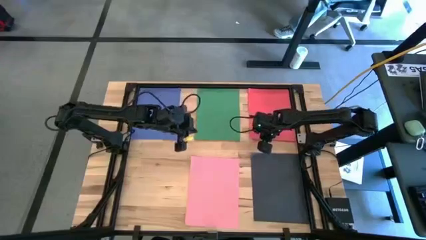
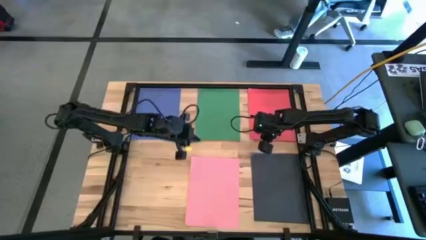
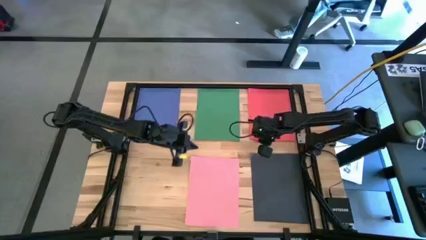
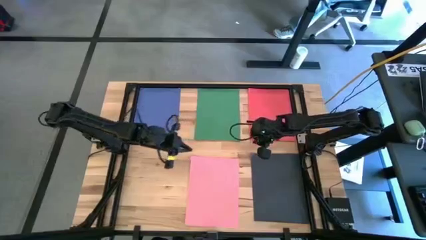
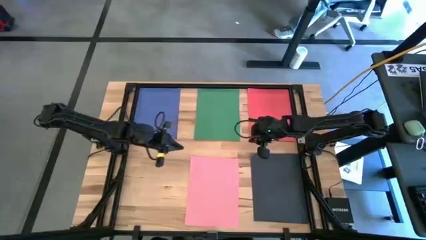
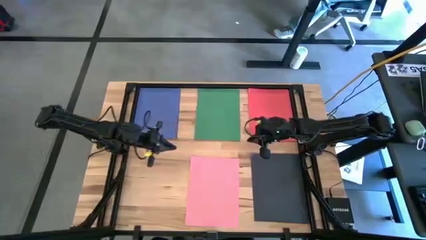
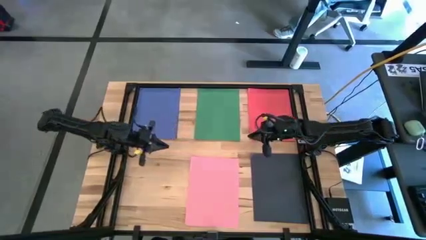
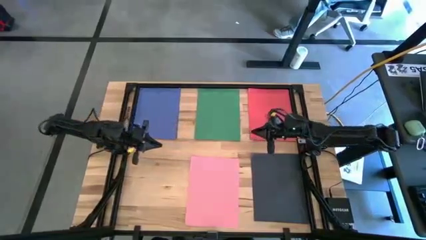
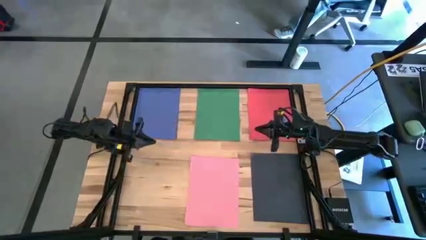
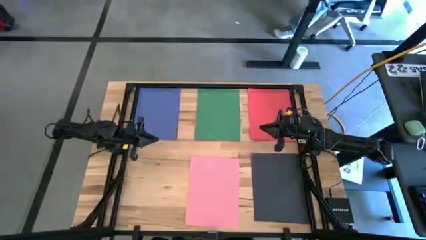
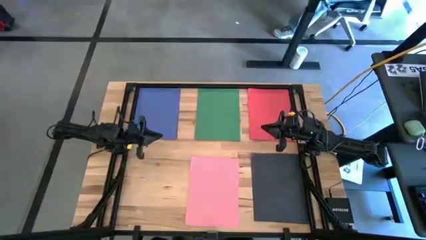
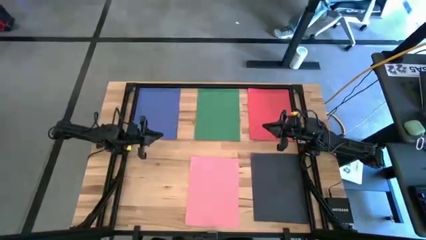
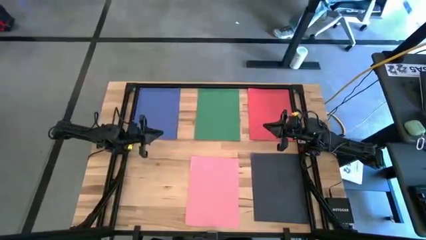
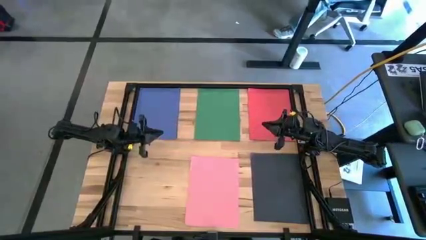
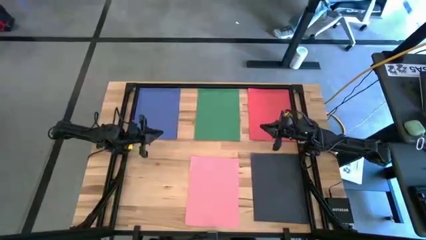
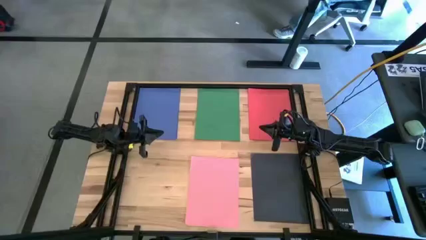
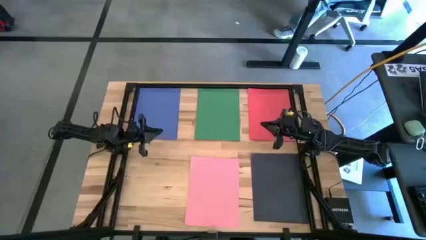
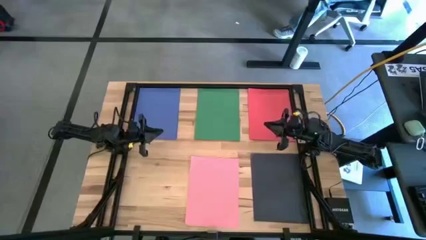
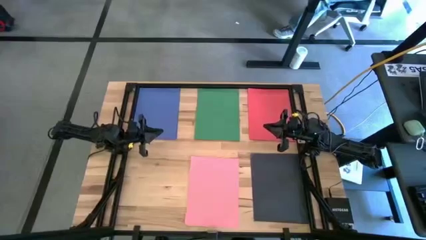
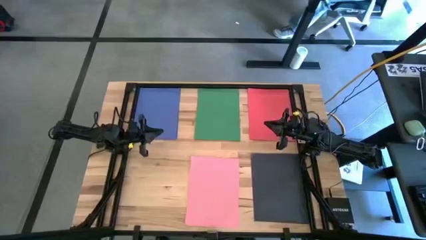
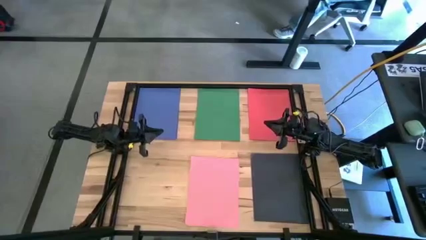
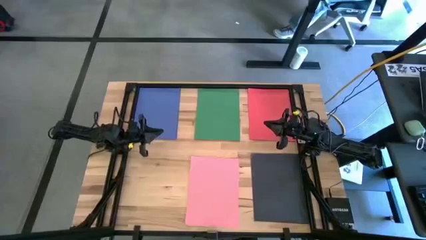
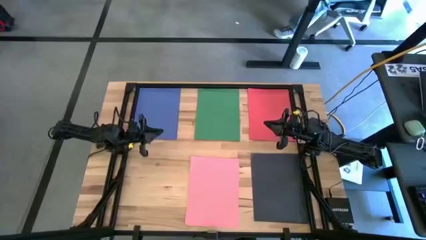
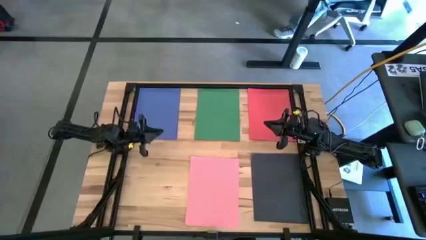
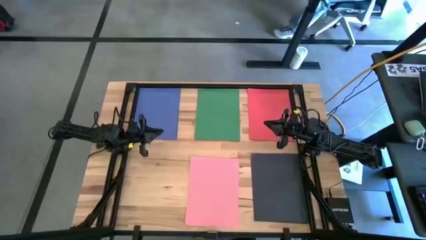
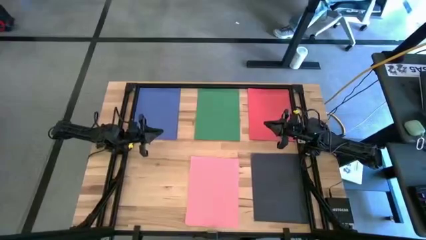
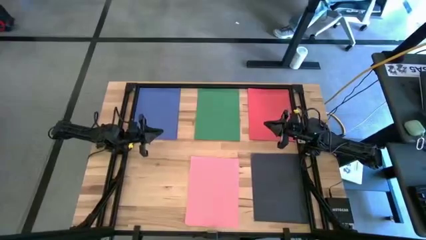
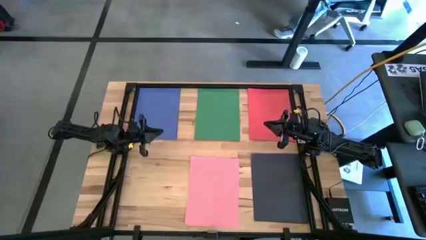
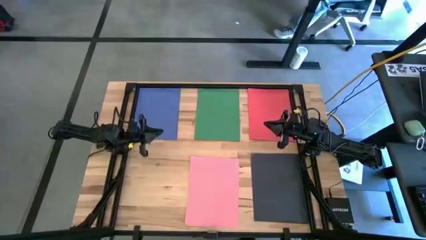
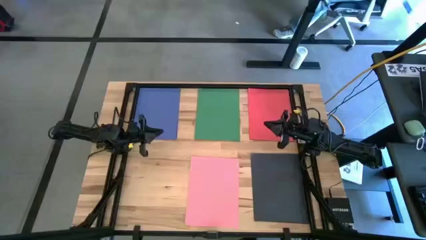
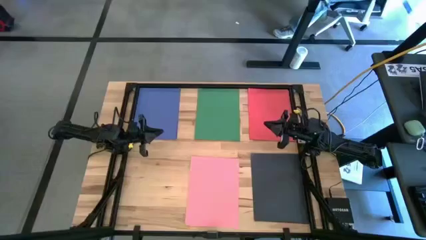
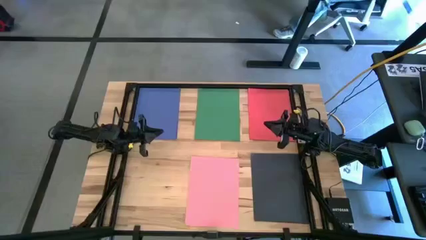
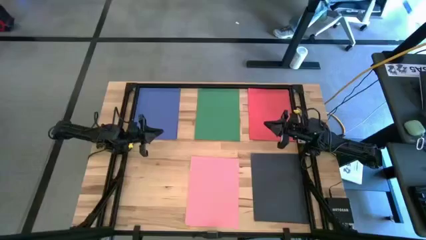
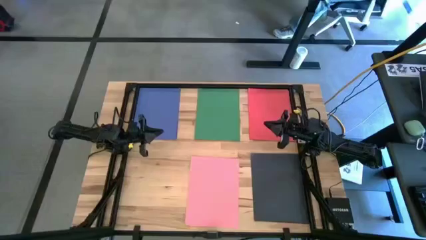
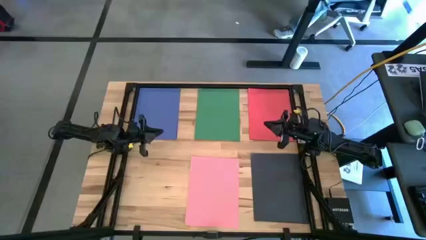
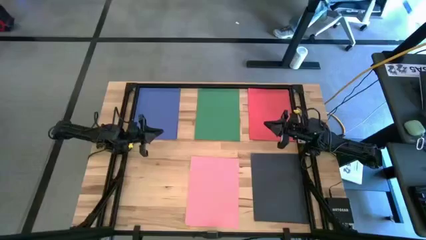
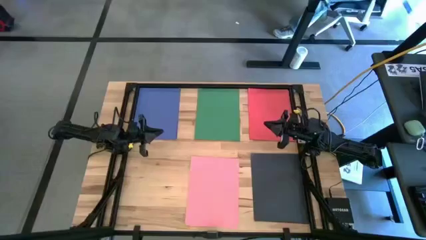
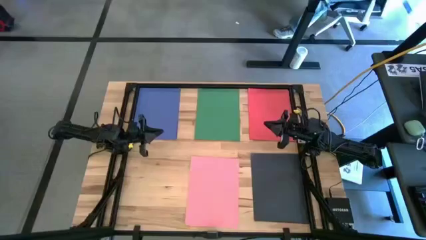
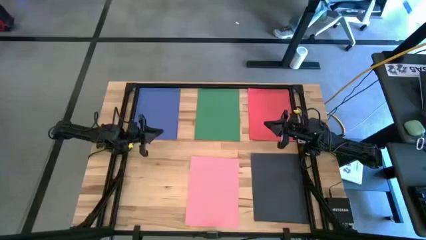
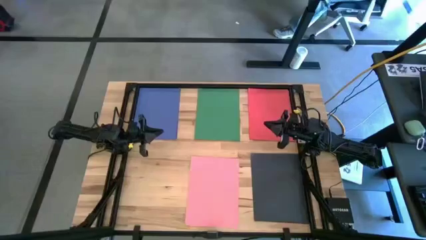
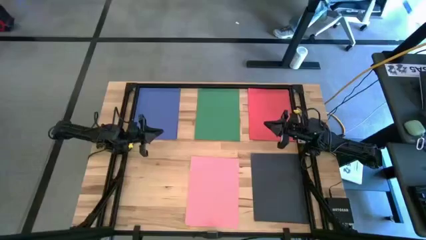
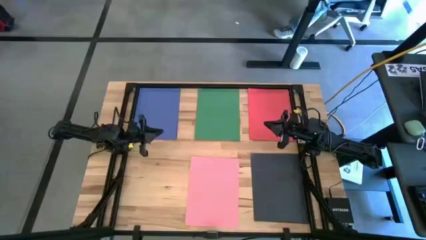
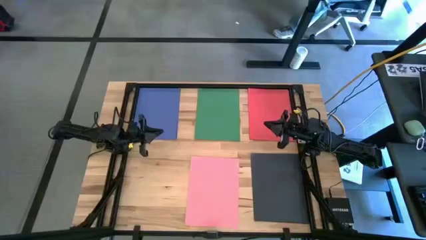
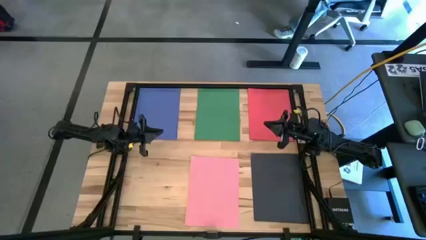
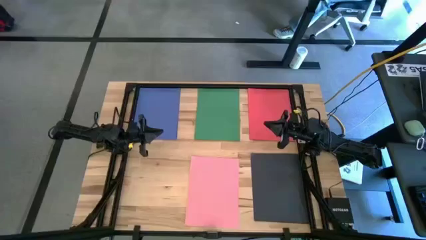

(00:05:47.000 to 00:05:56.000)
Task: Organize paper
Return to Home Position

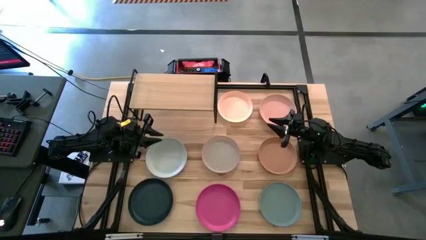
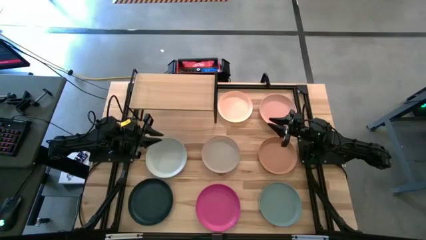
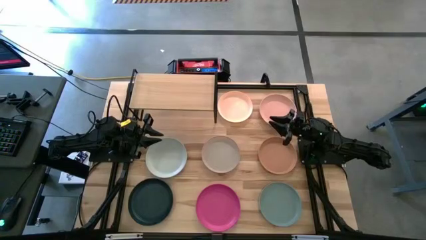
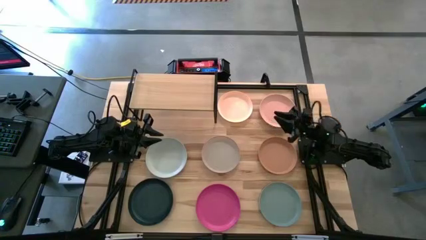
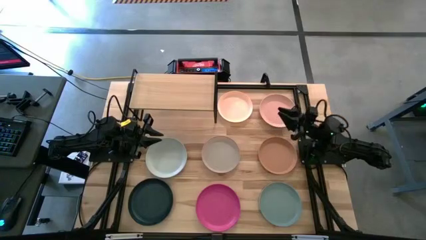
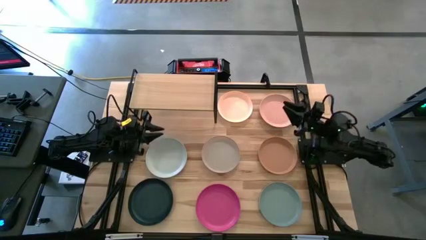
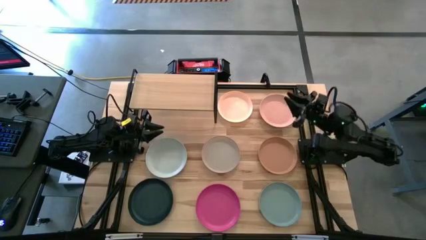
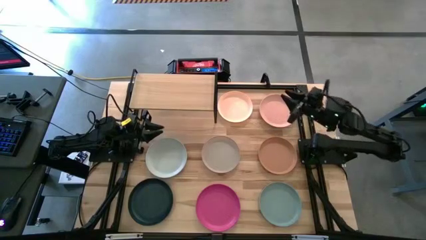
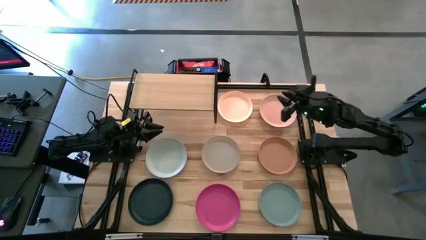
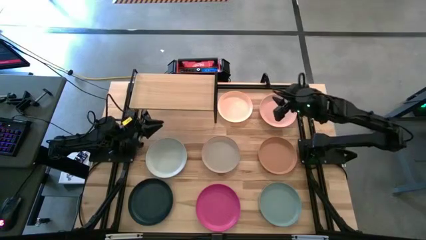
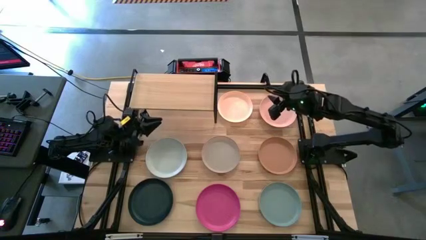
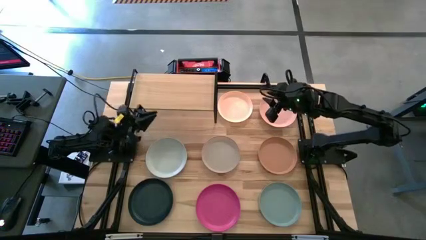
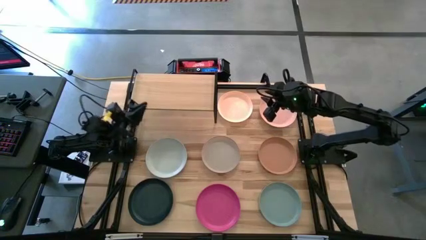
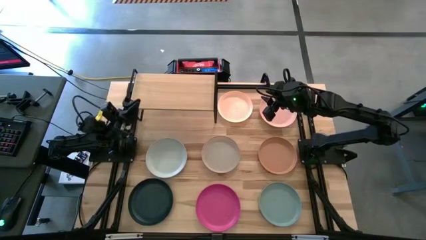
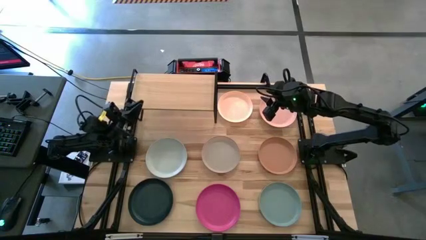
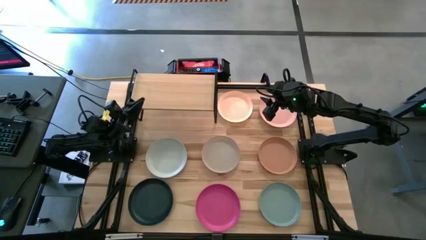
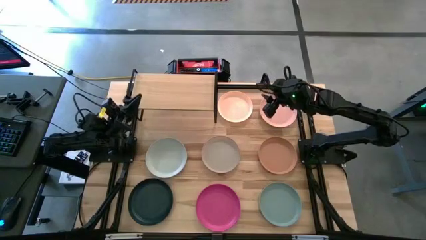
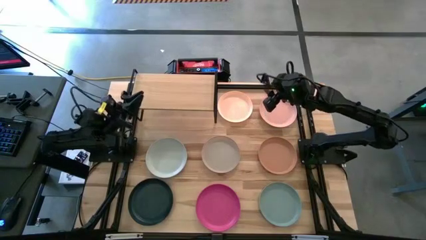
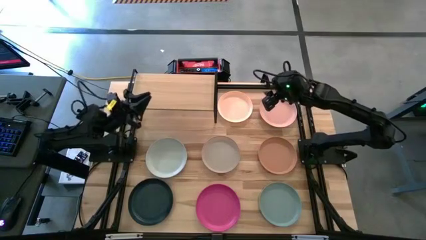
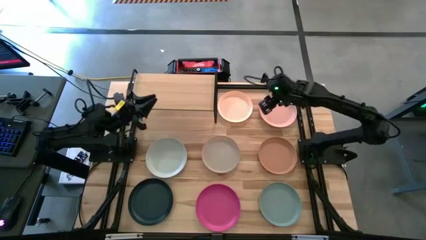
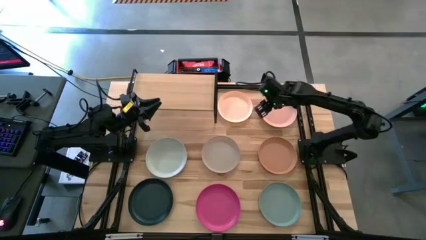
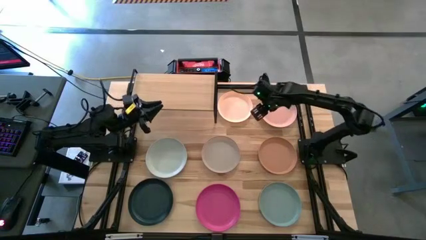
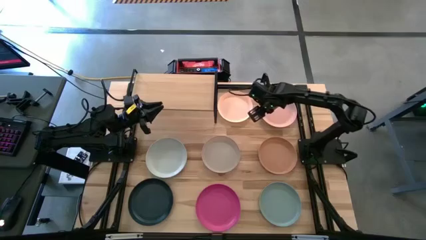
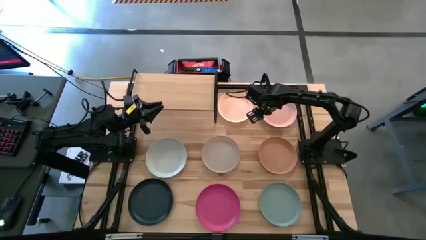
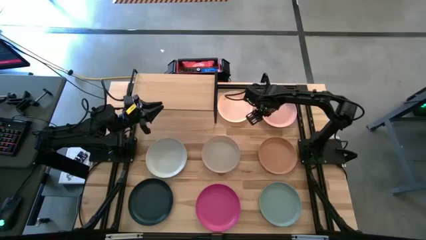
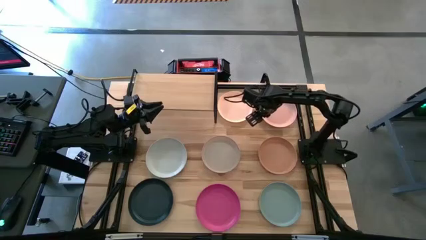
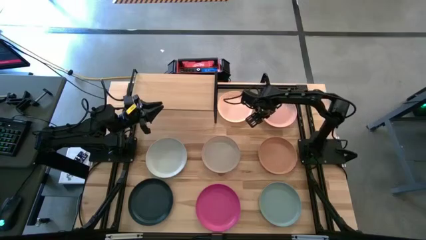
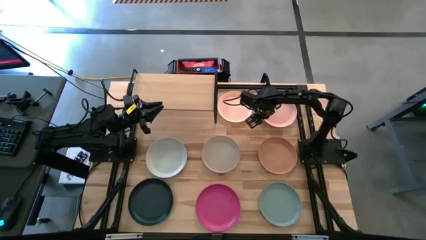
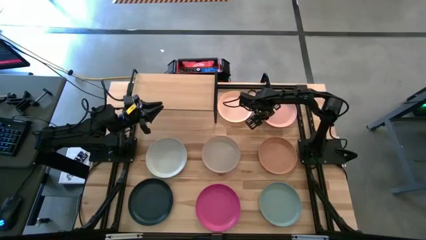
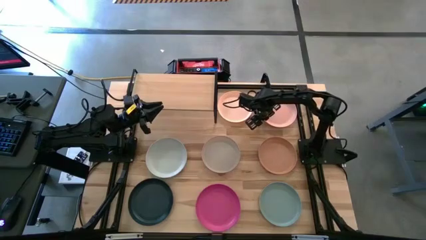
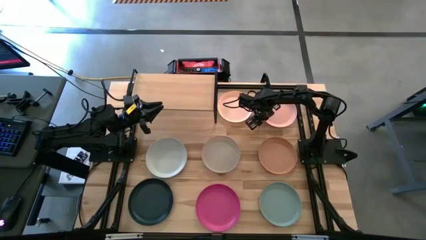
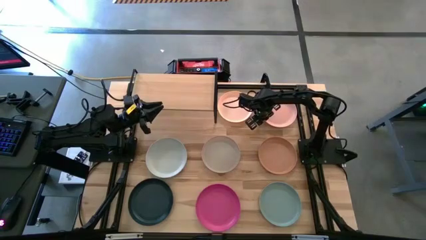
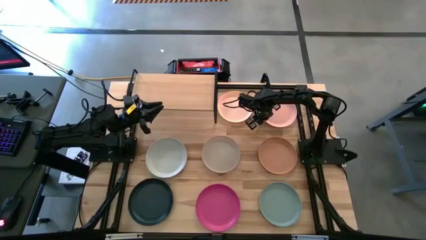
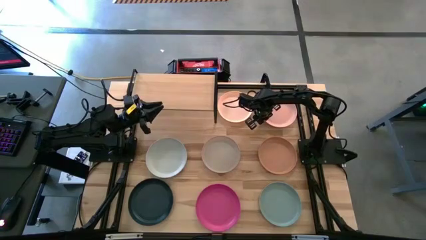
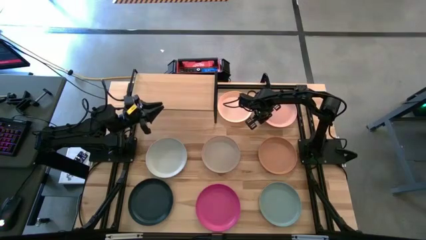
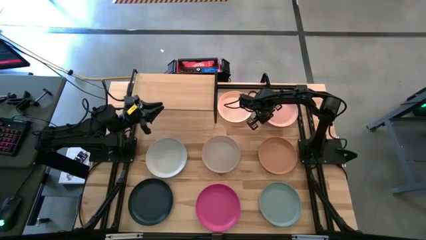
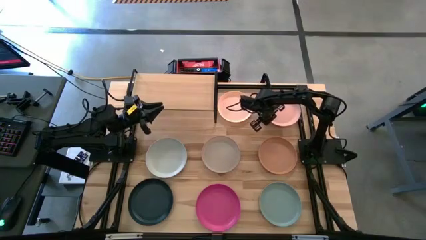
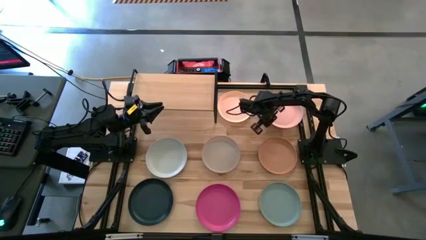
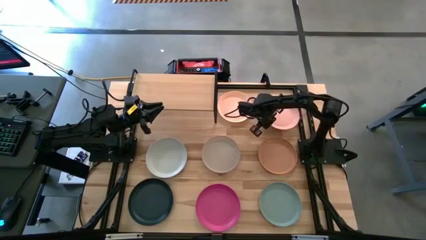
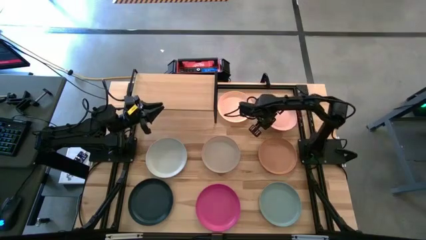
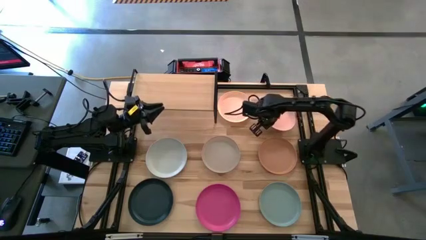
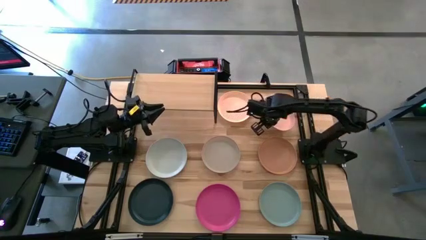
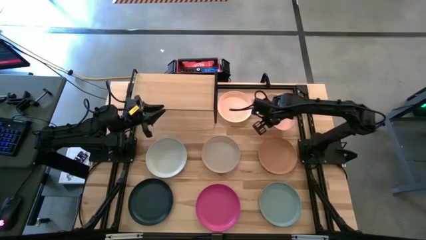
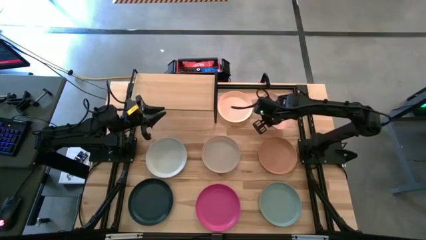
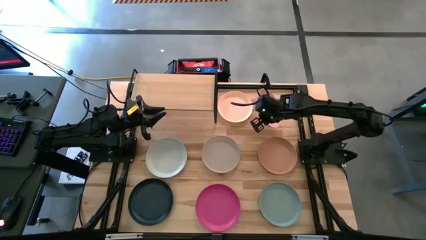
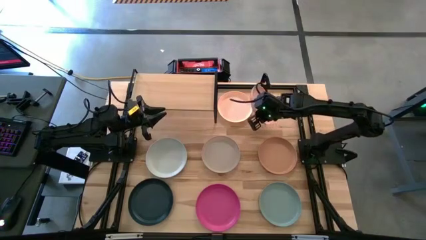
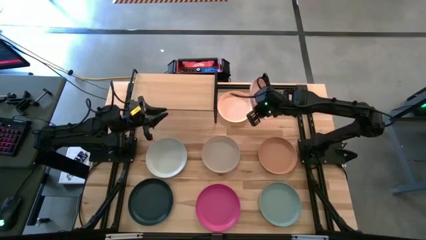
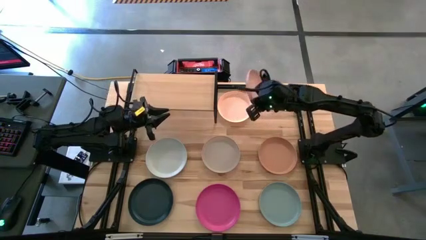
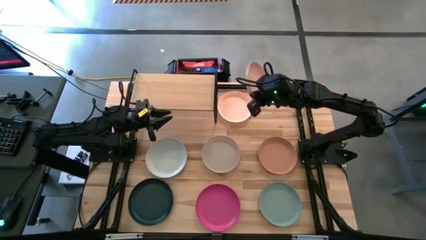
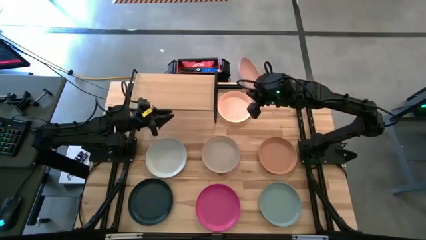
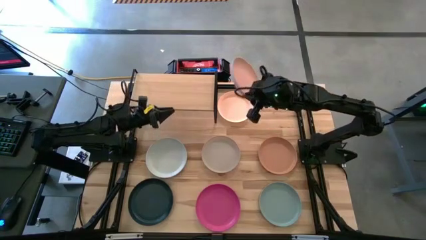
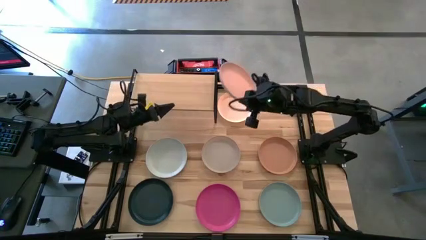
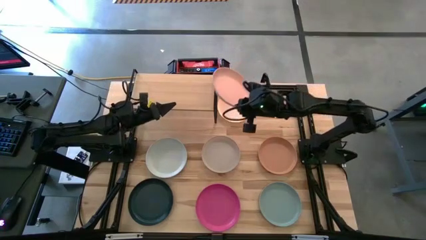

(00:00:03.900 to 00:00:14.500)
Task: Place and stack plates onto a shelf
Put the light pink plate on the shelf
